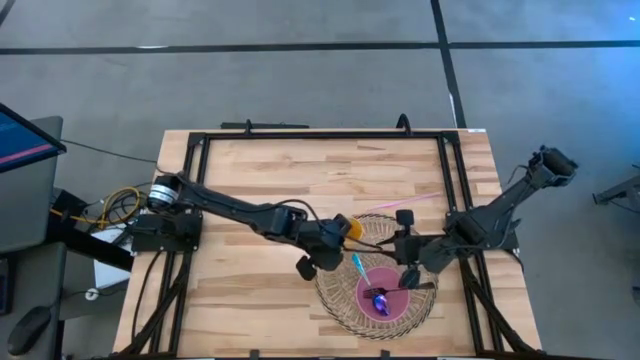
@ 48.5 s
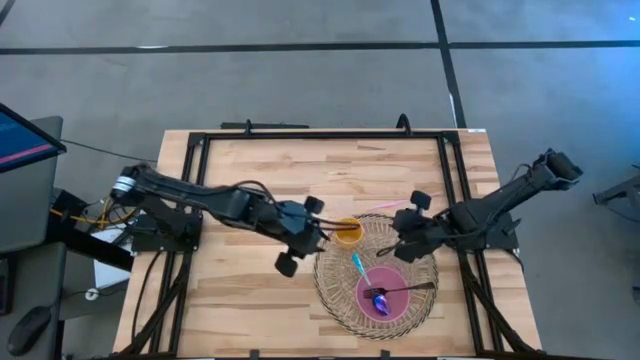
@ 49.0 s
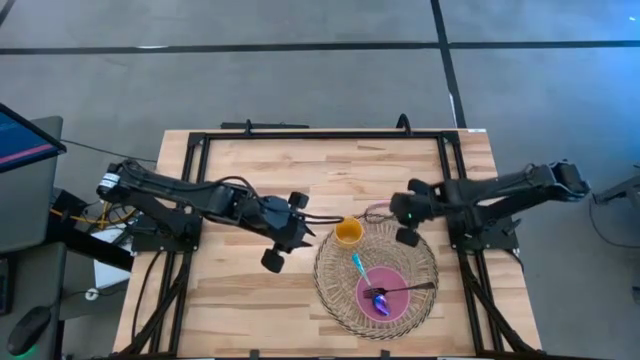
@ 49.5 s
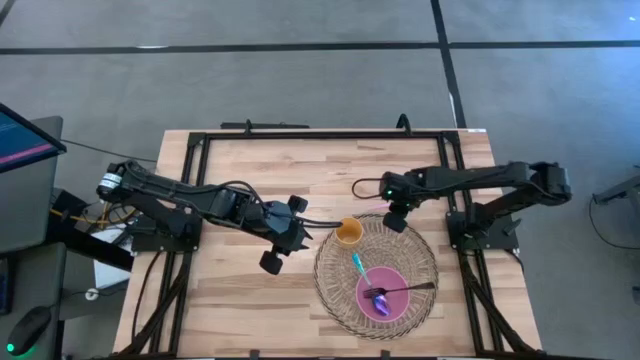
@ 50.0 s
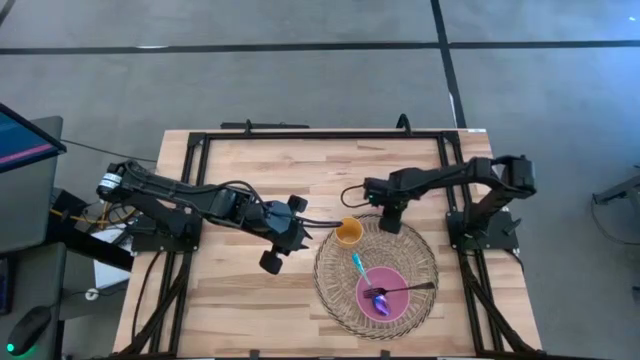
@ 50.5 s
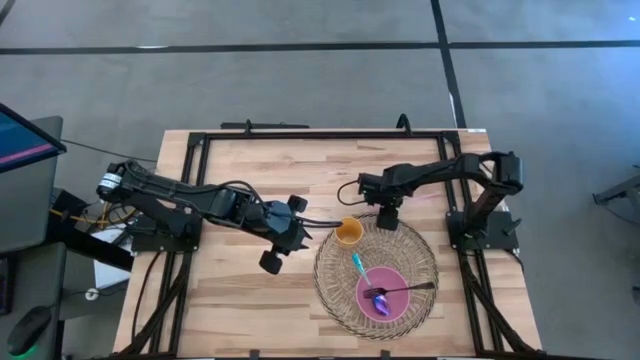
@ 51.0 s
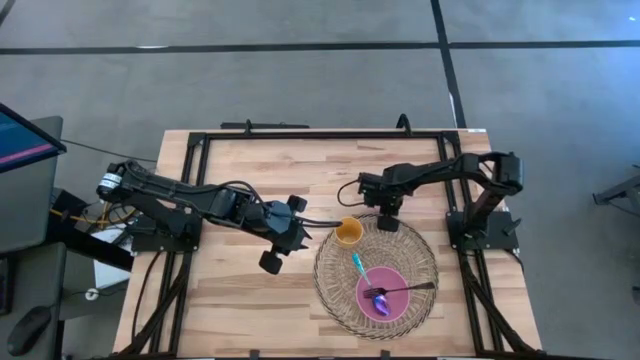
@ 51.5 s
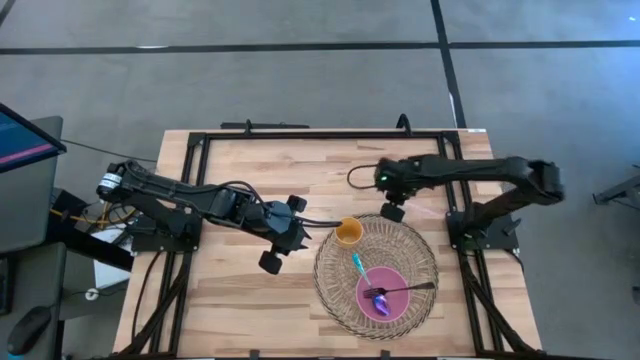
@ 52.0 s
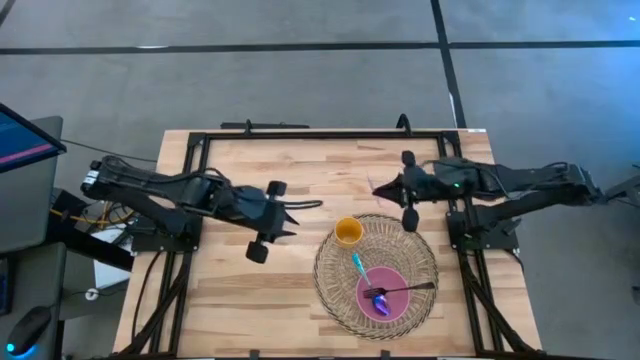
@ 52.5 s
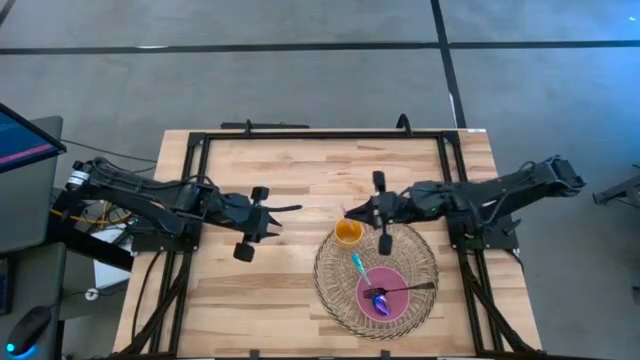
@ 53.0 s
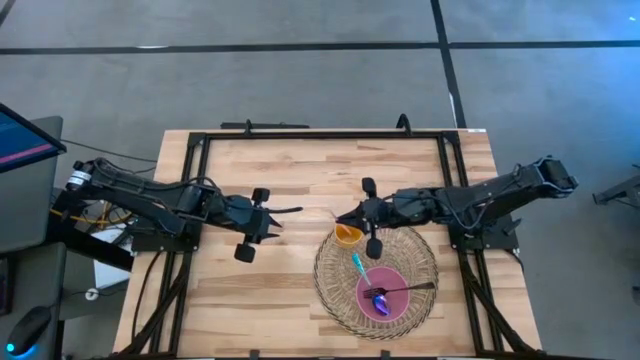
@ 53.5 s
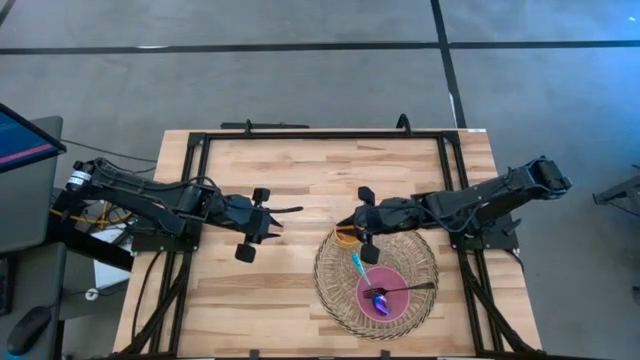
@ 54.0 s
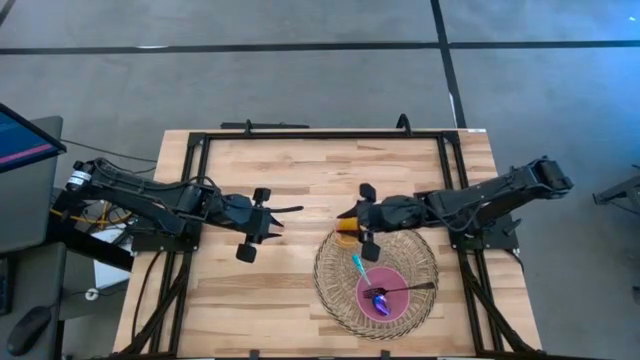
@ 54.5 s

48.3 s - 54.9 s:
Task: Pick & Place Utensil
Put the pink straw into the yellow cup on the brown mat

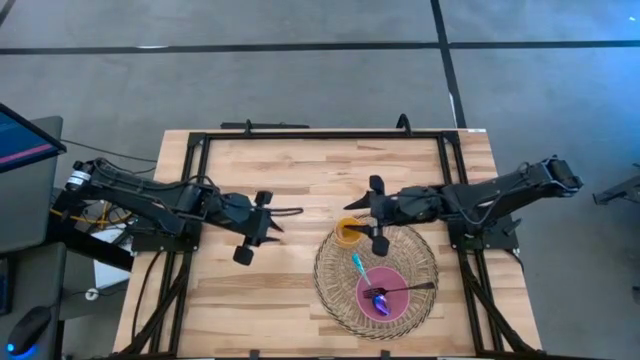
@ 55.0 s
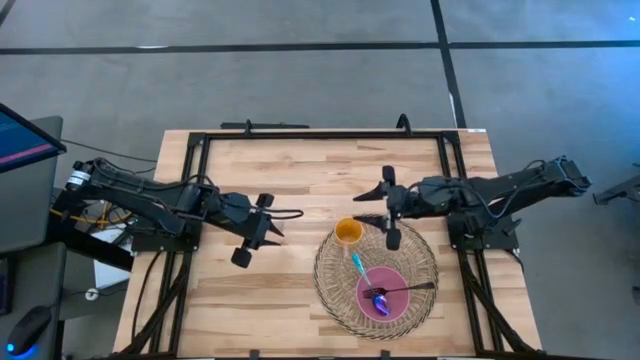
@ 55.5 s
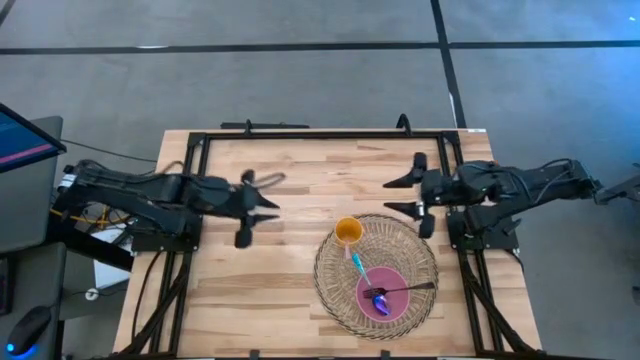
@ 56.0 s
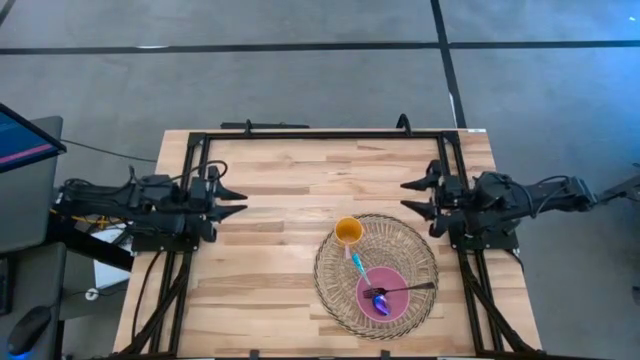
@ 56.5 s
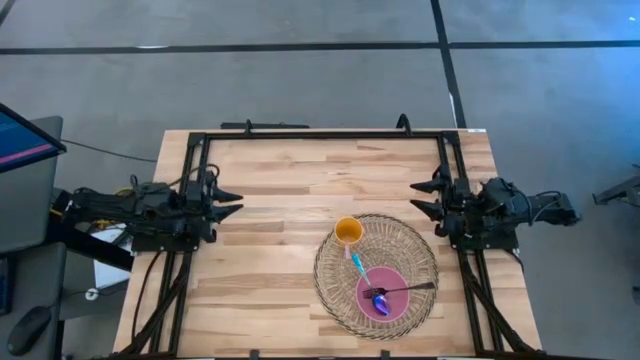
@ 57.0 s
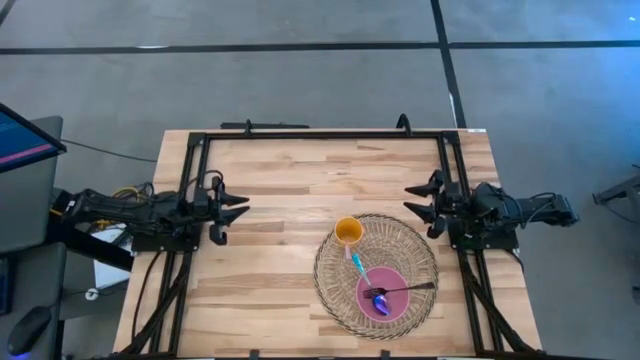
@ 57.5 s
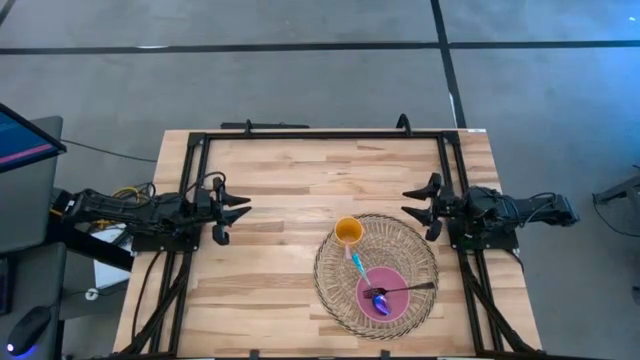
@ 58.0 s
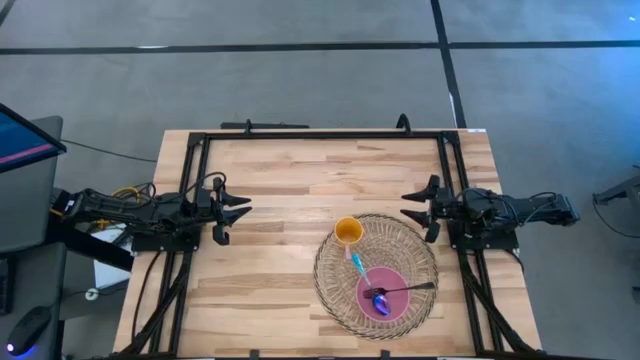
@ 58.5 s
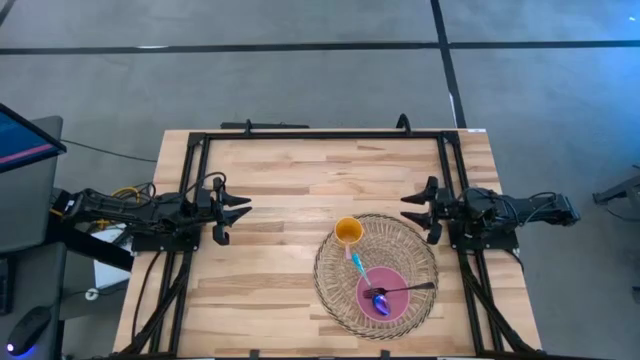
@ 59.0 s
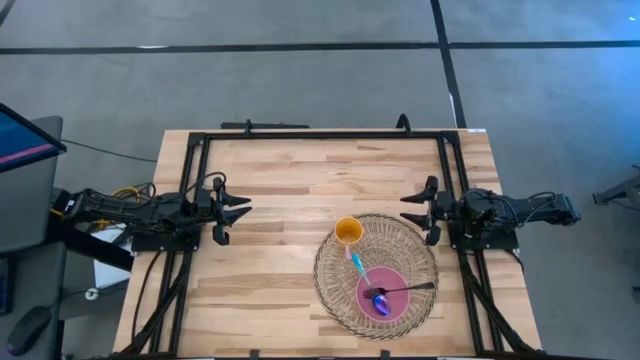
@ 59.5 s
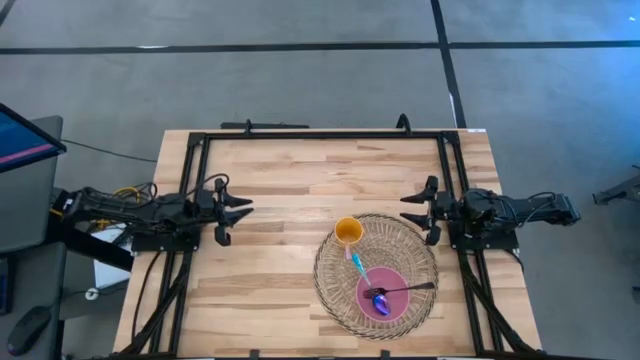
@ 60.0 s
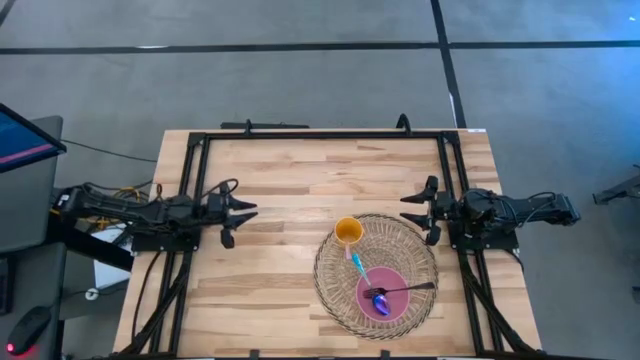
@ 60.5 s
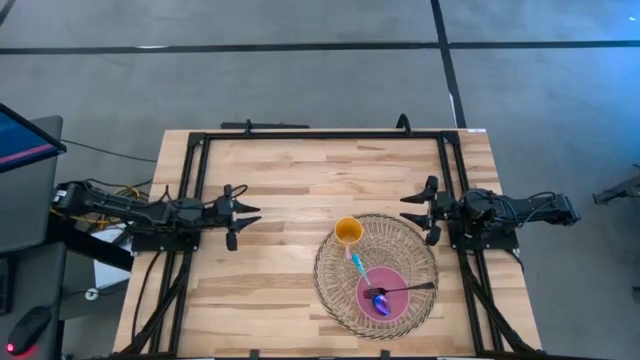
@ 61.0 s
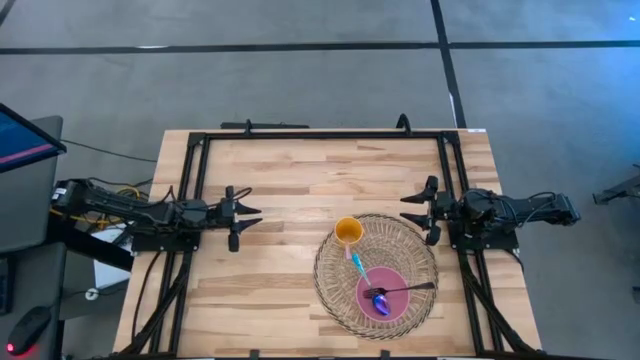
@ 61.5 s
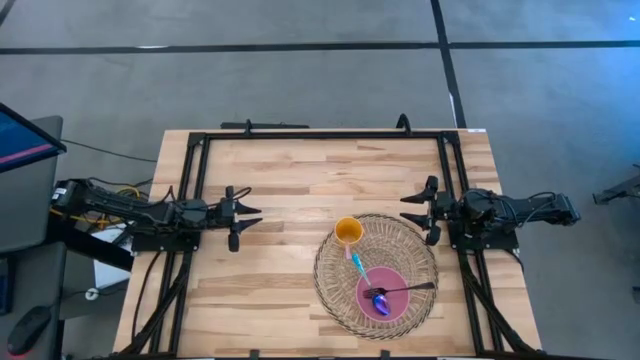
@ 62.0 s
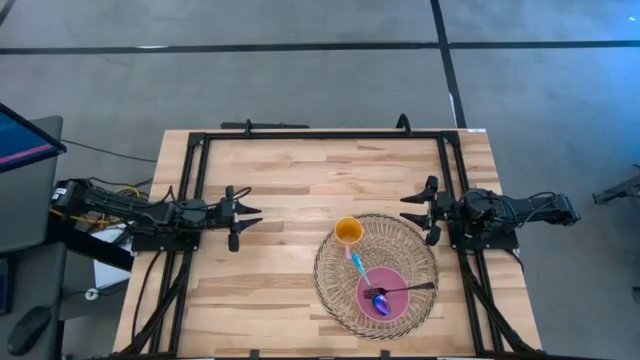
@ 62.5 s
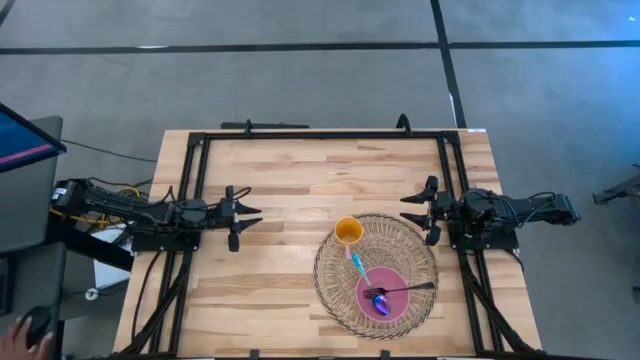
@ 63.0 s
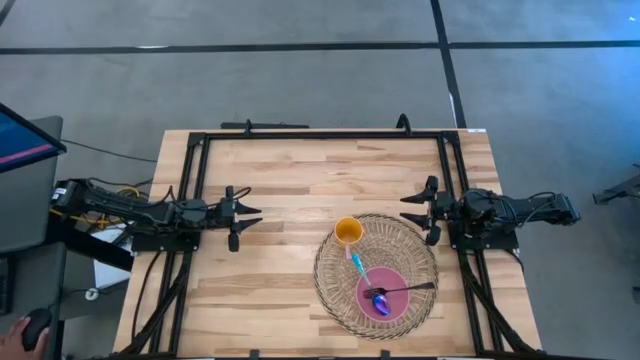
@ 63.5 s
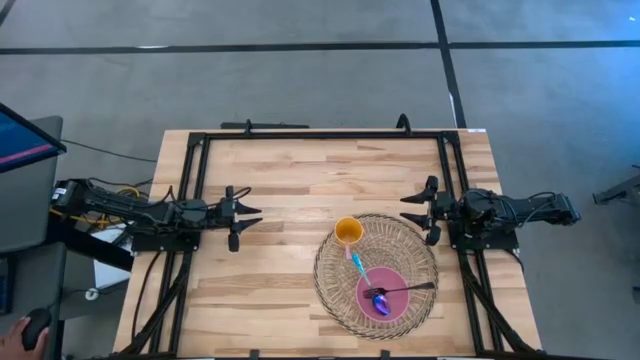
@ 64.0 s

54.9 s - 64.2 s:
Return to Home Position
